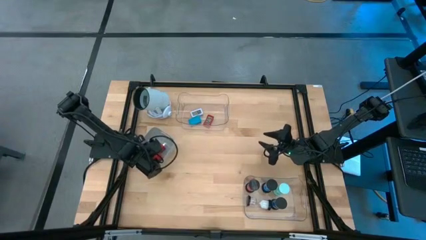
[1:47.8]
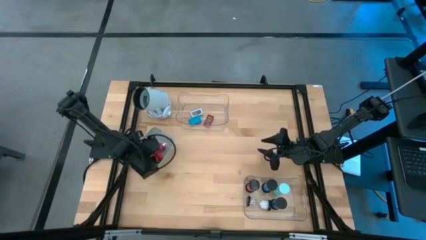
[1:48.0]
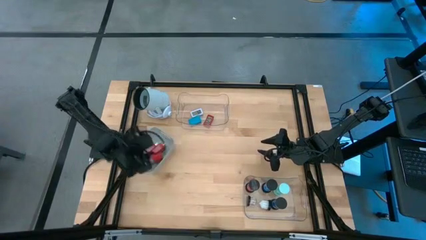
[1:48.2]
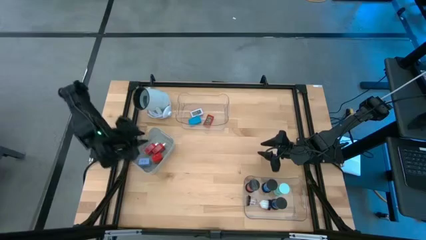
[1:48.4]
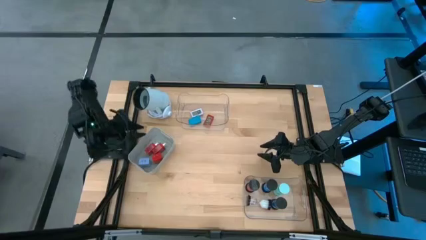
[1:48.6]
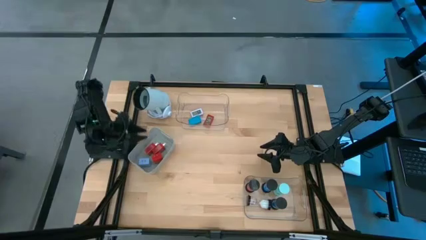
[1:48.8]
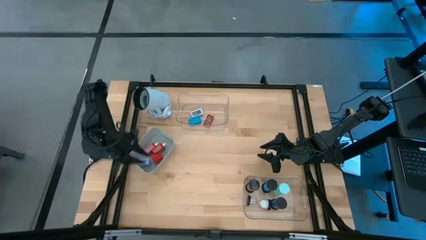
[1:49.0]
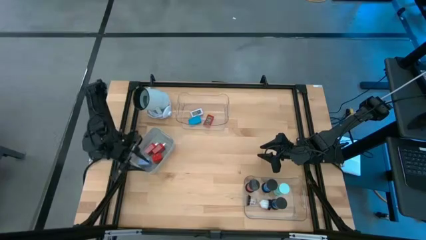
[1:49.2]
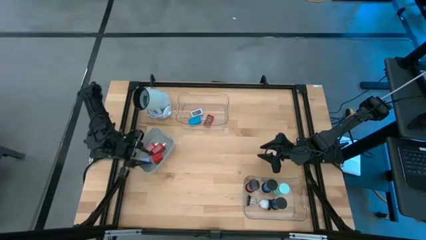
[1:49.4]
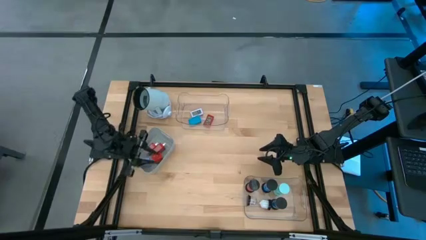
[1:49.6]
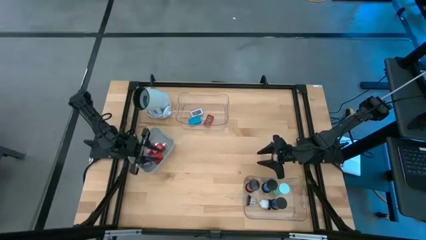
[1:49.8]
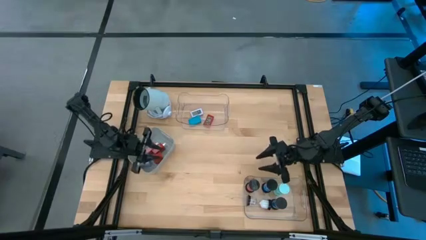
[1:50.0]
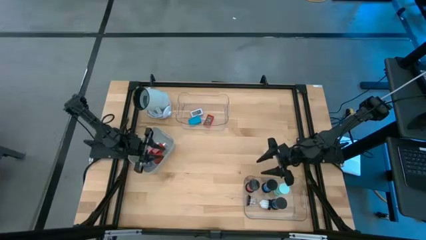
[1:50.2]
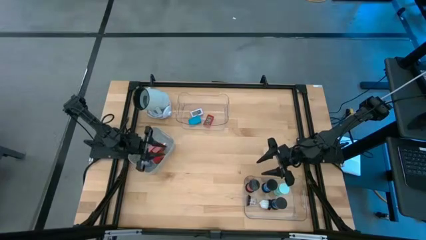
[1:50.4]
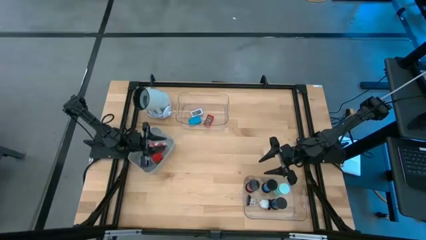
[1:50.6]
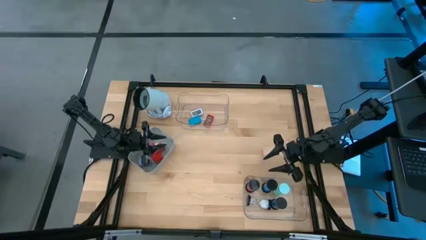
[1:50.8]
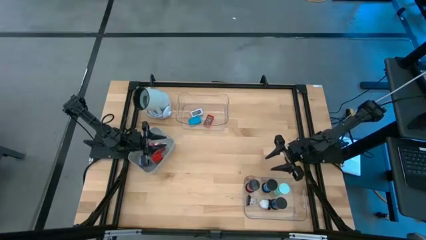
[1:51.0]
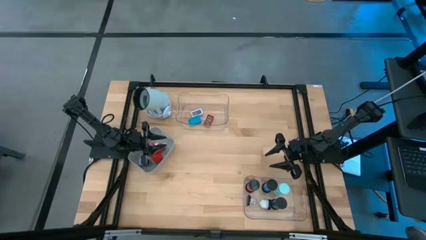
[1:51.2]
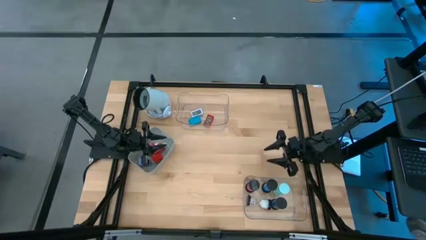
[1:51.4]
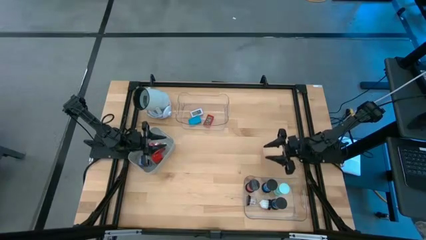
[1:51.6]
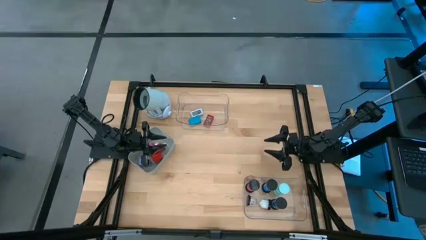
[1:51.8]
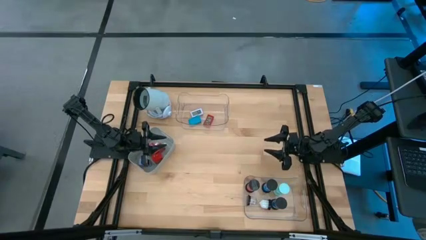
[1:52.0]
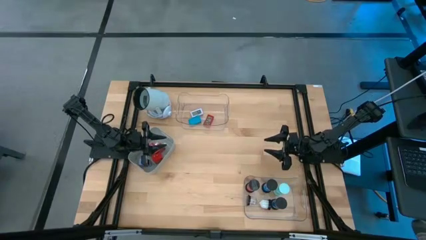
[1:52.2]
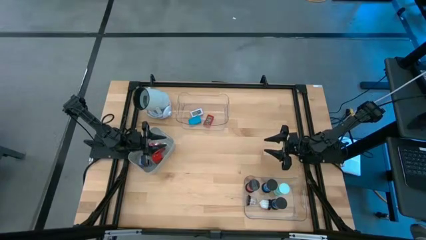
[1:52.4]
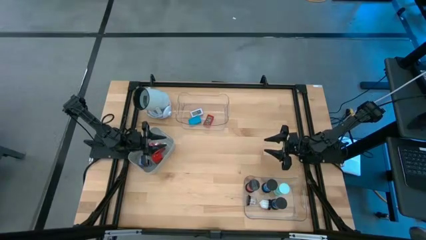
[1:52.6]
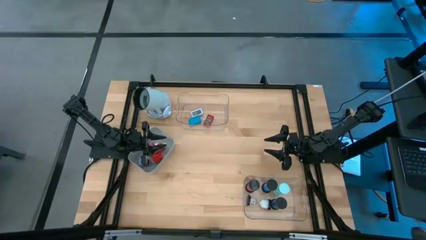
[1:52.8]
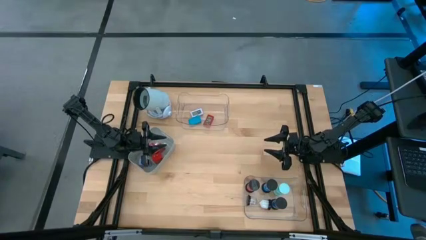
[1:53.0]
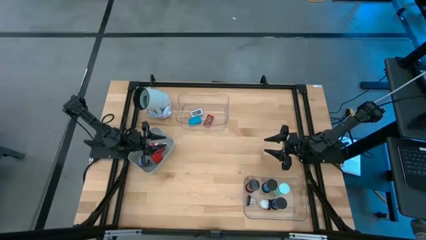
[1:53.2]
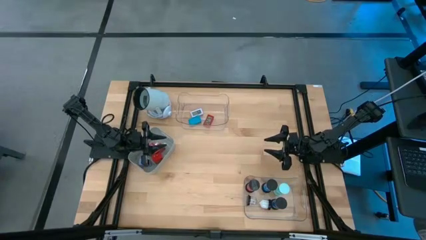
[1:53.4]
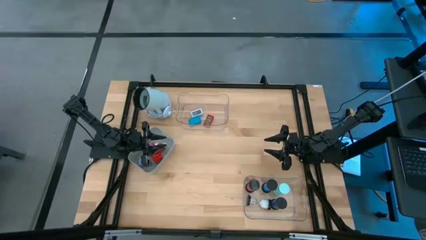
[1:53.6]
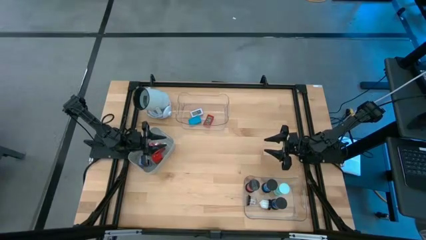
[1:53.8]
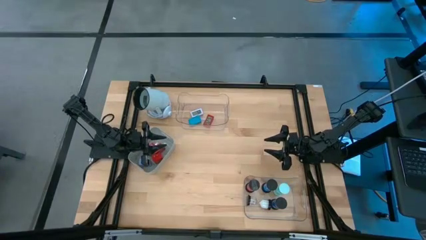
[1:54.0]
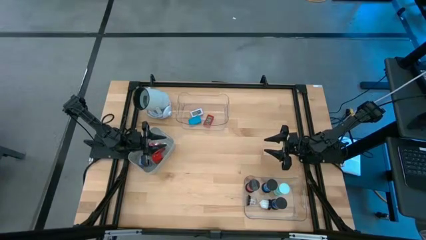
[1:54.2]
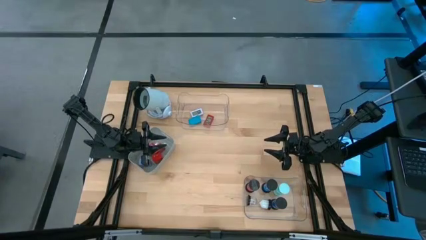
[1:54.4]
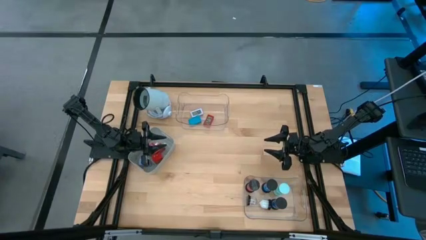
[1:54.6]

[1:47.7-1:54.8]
Task: Pick & Place Office items
Return to Home Position

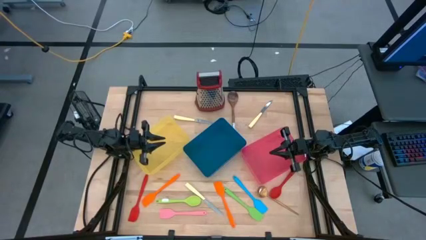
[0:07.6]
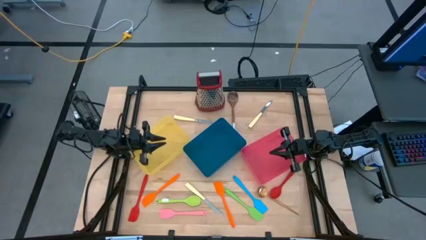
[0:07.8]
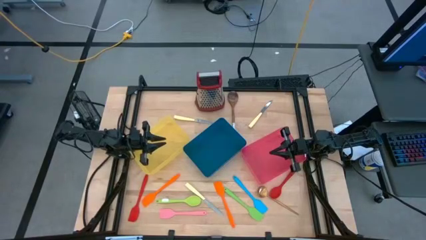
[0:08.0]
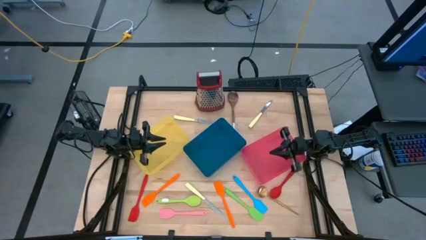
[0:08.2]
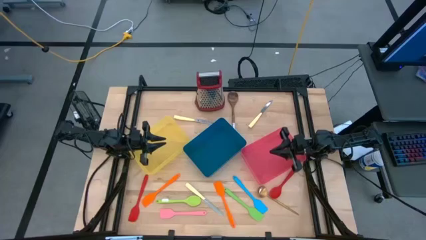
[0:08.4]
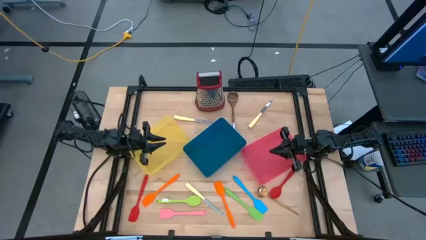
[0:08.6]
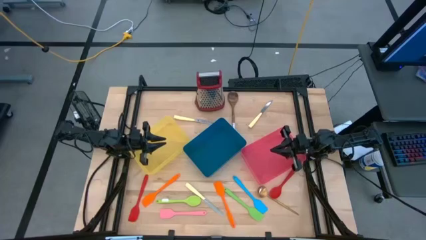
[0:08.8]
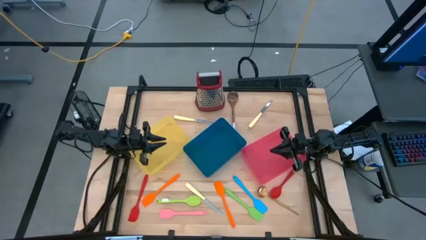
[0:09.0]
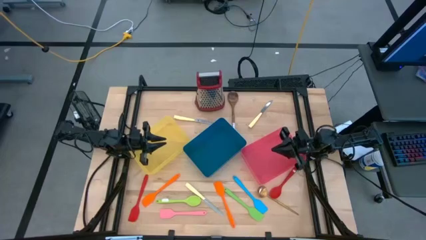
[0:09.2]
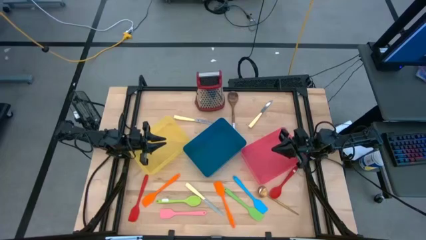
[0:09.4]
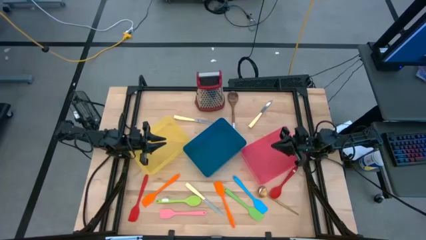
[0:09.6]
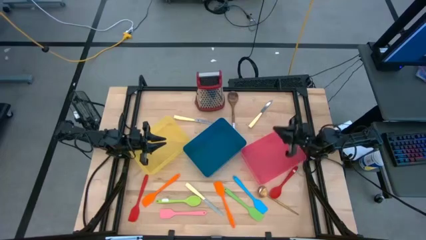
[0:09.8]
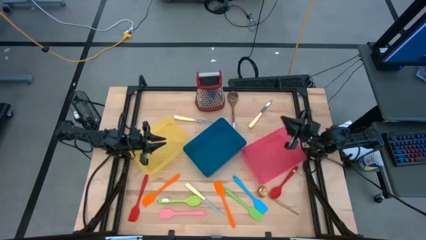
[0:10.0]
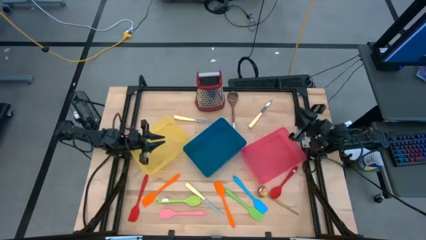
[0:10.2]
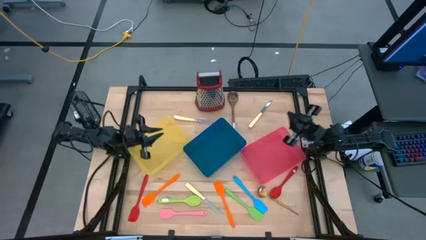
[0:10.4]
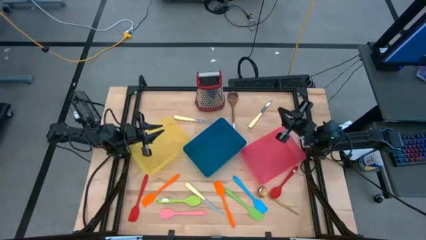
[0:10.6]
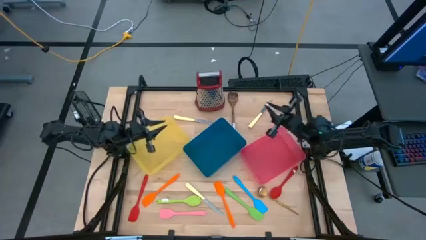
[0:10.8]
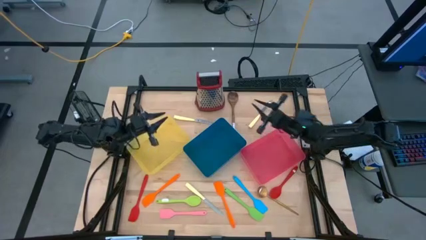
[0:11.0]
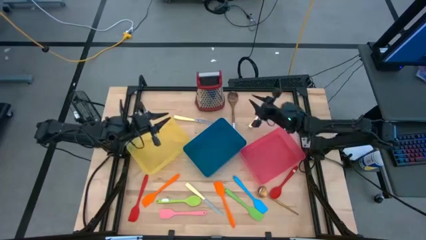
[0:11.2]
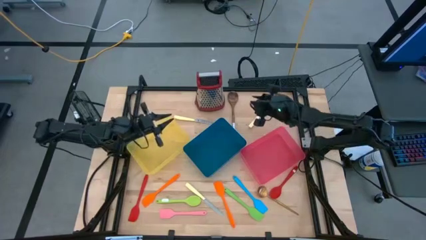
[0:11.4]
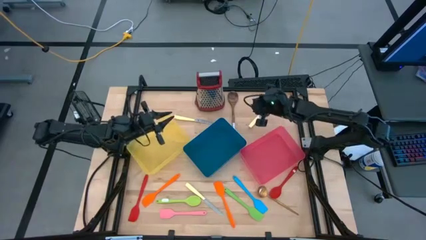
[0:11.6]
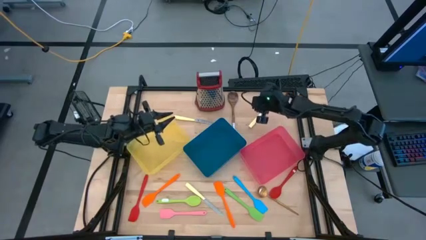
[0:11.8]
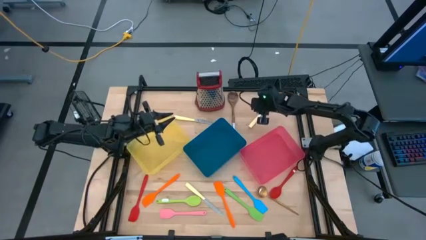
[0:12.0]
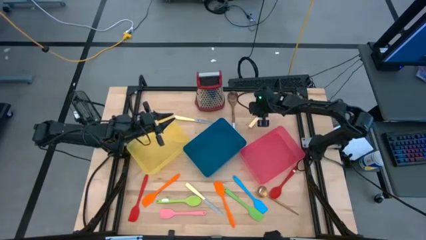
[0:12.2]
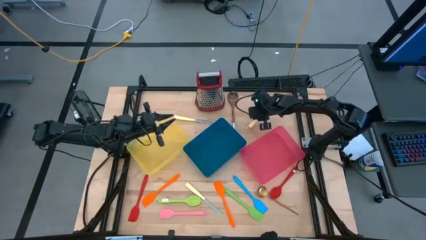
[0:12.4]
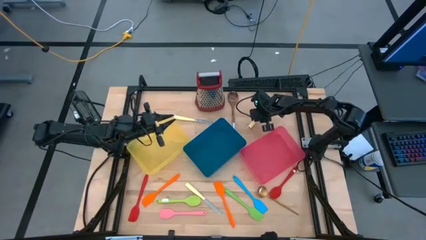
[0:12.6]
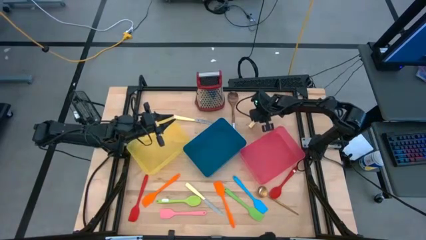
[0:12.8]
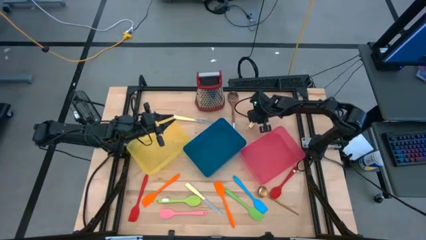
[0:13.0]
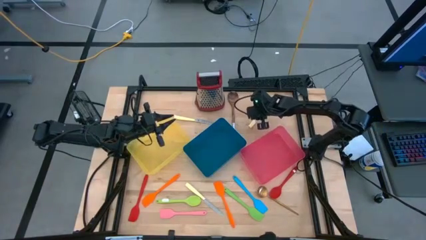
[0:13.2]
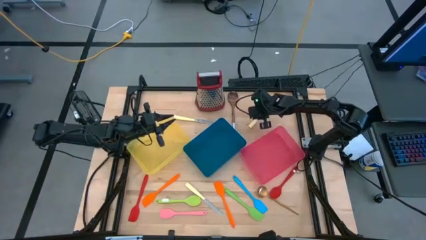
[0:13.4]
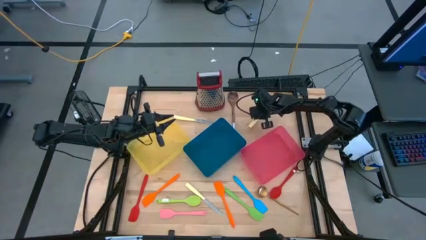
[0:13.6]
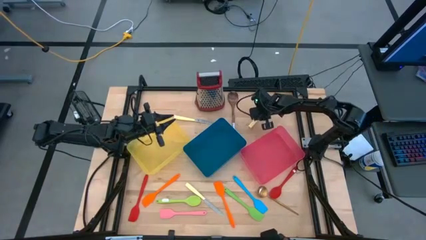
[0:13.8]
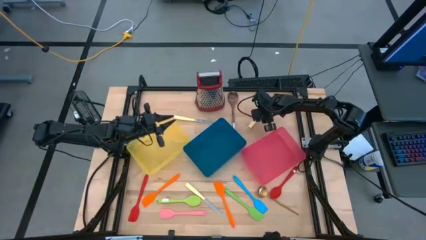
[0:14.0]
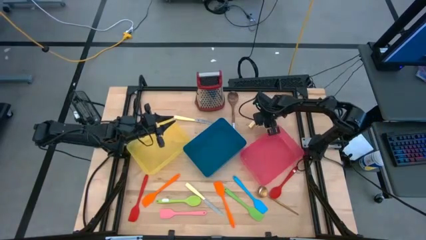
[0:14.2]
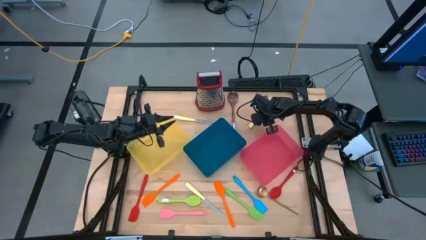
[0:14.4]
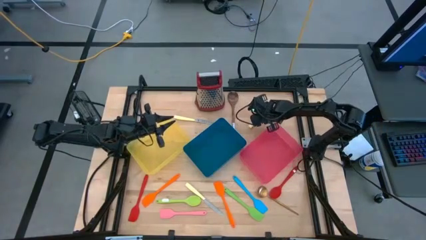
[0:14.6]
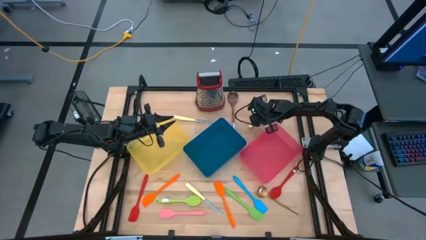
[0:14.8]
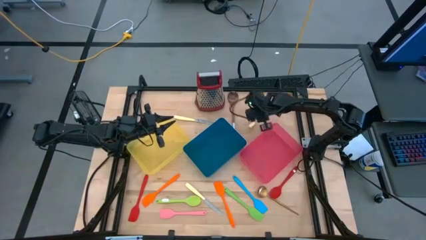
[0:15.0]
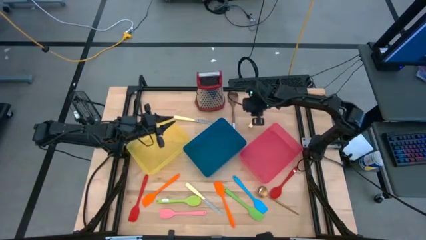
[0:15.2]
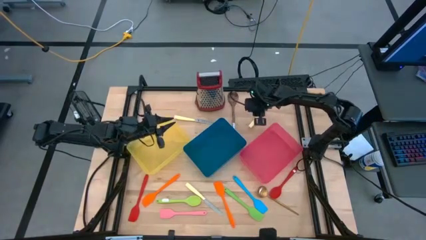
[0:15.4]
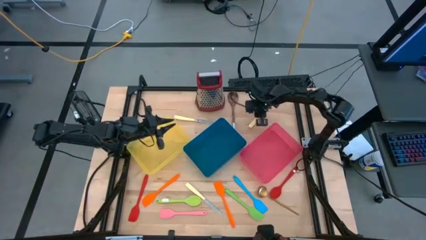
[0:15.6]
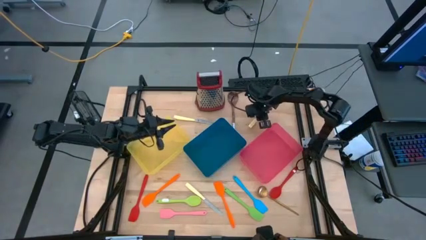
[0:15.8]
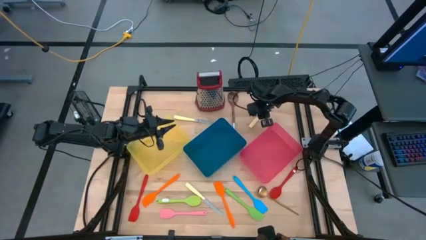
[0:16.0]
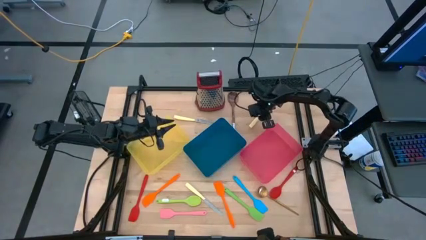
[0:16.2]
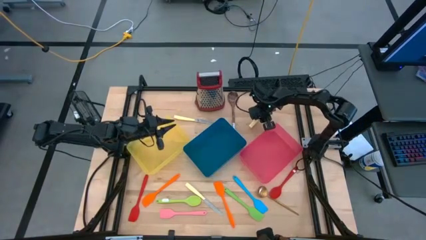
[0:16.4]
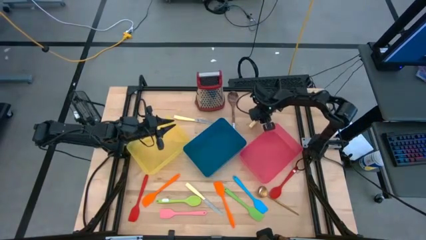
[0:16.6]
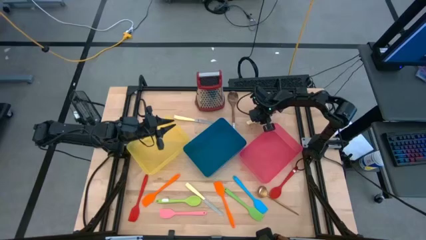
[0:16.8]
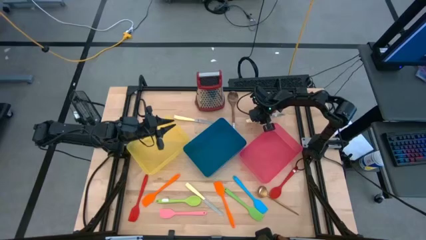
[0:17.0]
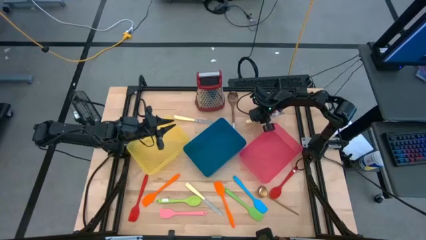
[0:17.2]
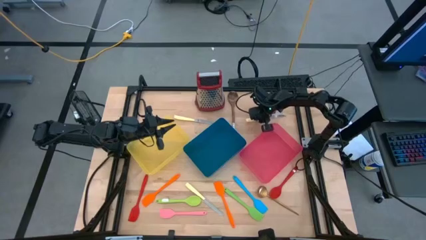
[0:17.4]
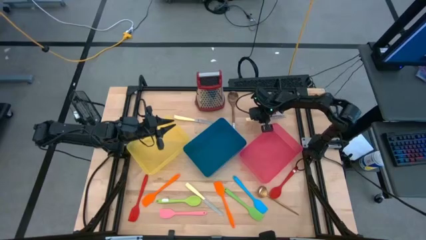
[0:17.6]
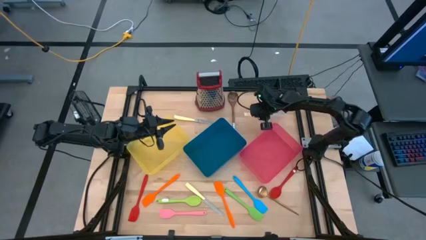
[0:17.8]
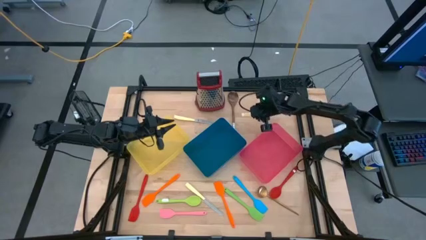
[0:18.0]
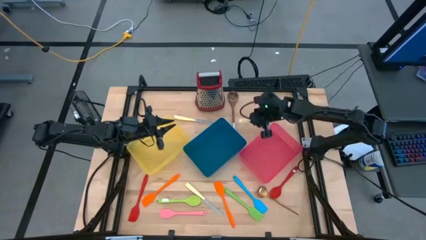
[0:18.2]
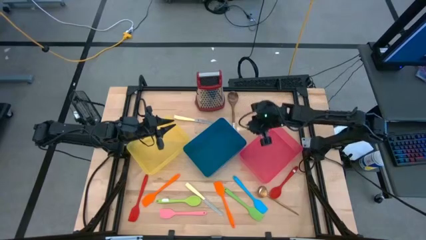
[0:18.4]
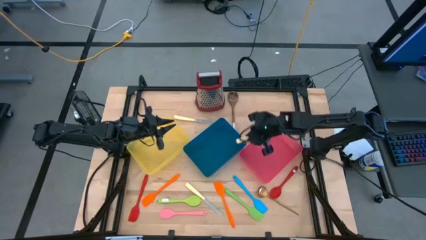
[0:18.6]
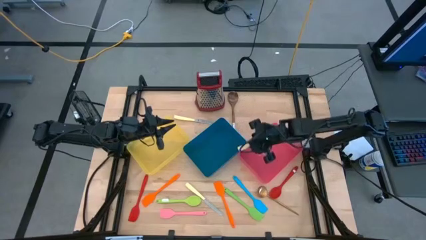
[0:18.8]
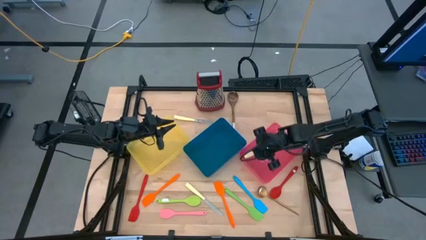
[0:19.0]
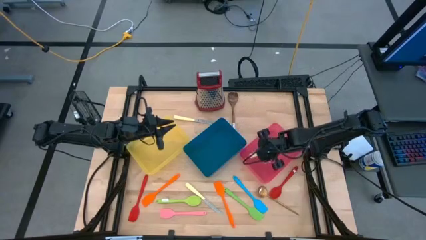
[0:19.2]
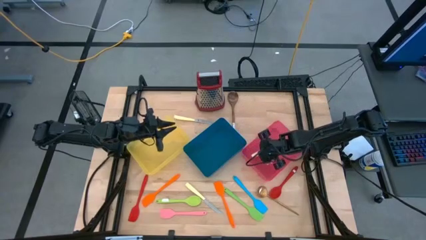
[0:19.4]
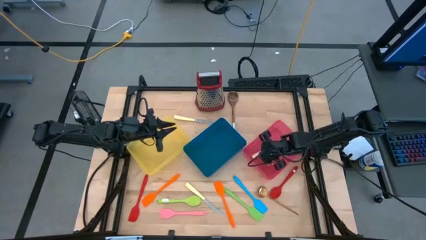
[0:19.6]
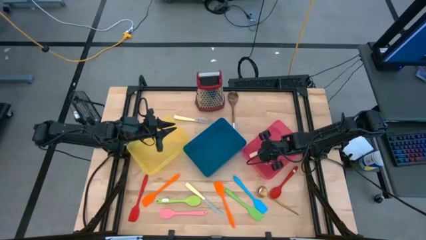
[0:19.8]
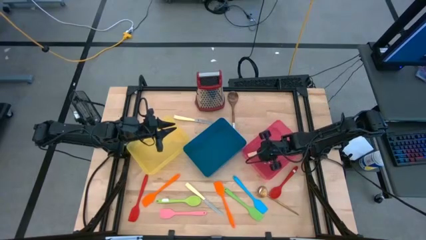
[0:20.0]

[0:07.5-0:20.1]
Task: Pick & Place Kitchen Items
Put the yellow table knife into the red bin
